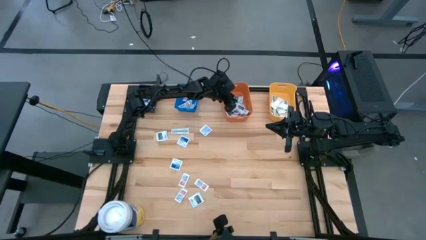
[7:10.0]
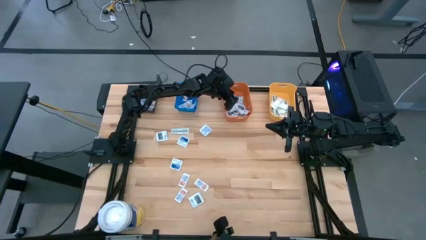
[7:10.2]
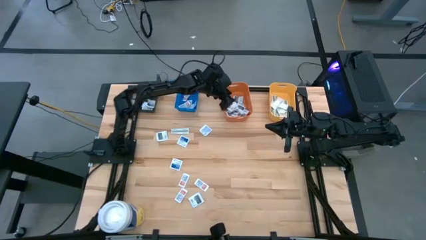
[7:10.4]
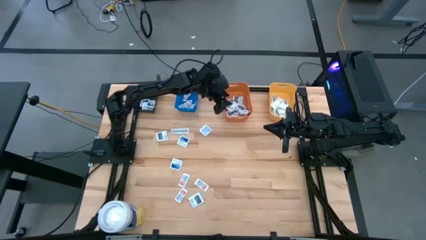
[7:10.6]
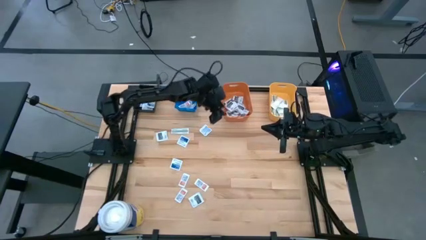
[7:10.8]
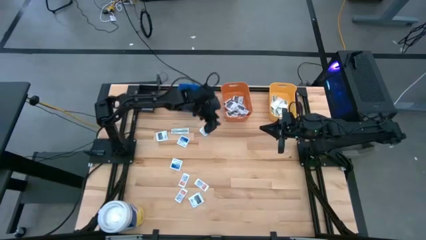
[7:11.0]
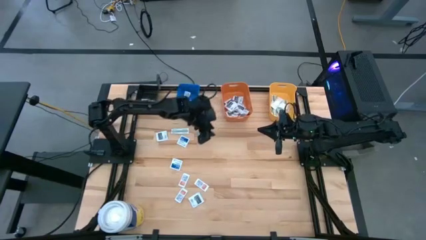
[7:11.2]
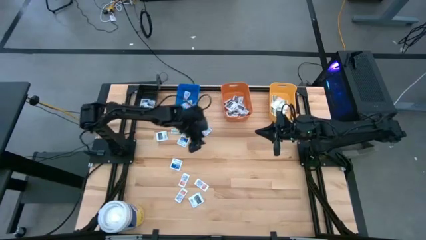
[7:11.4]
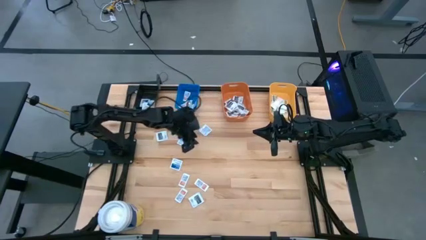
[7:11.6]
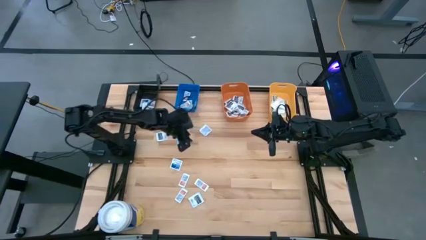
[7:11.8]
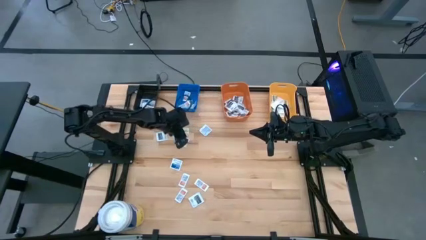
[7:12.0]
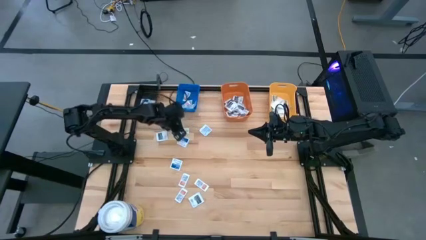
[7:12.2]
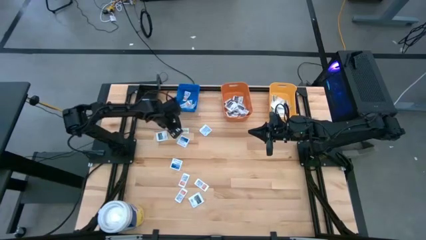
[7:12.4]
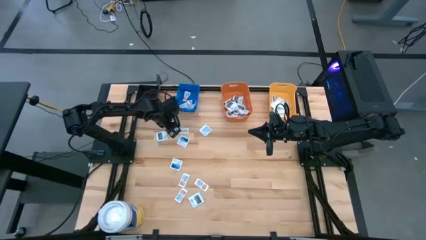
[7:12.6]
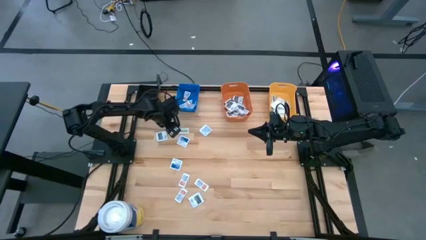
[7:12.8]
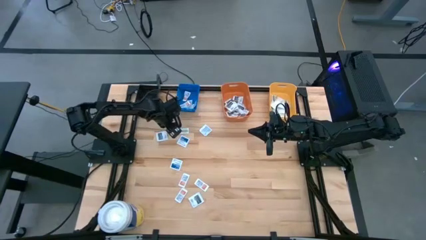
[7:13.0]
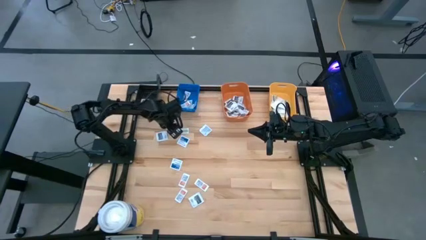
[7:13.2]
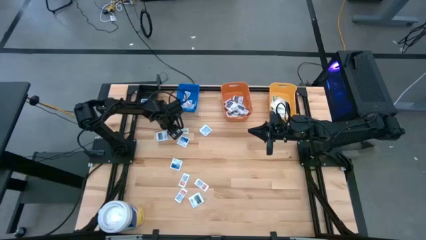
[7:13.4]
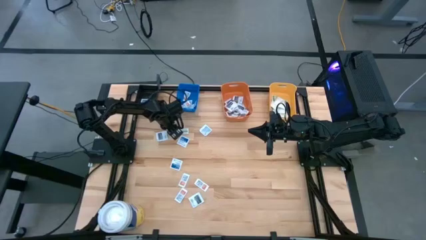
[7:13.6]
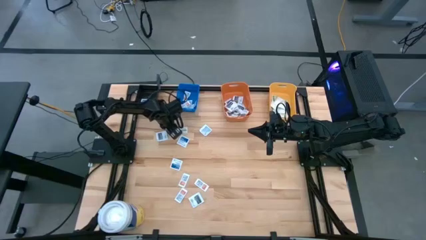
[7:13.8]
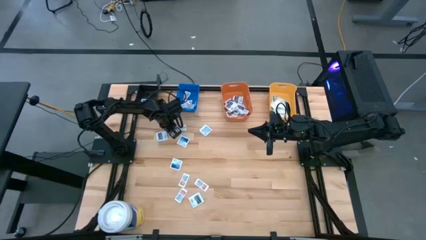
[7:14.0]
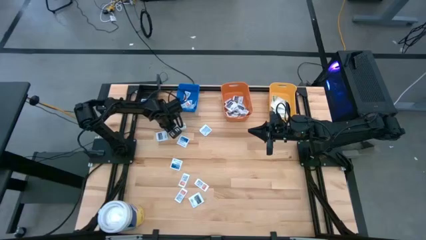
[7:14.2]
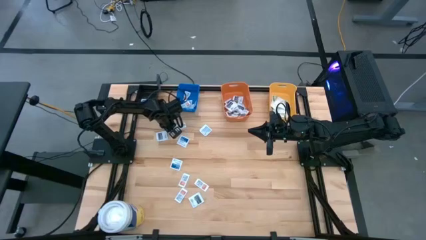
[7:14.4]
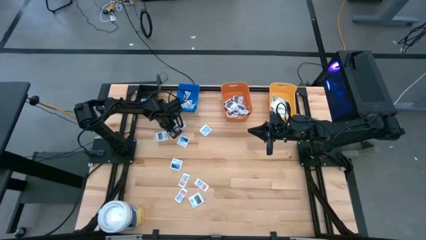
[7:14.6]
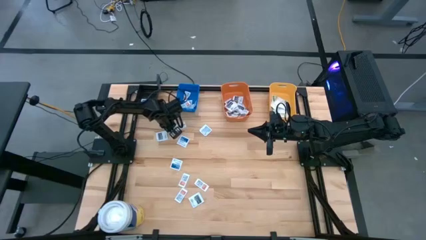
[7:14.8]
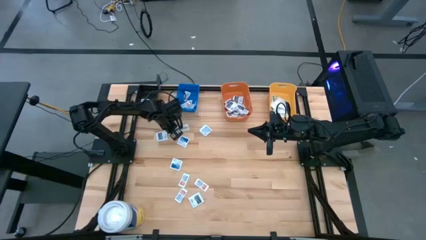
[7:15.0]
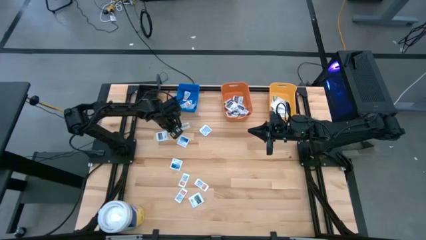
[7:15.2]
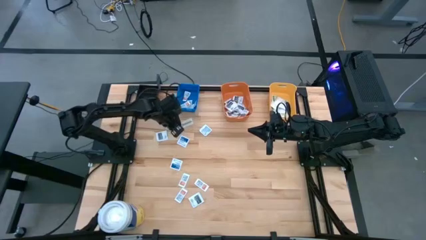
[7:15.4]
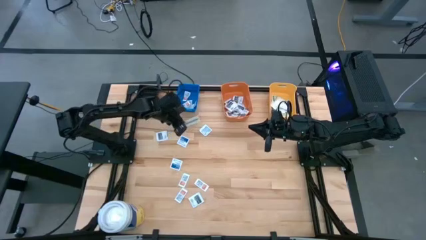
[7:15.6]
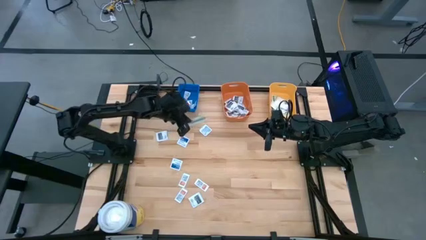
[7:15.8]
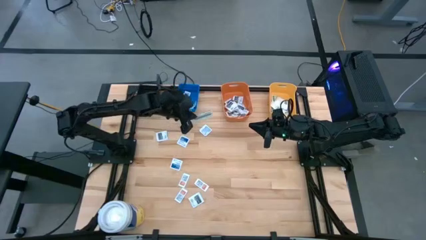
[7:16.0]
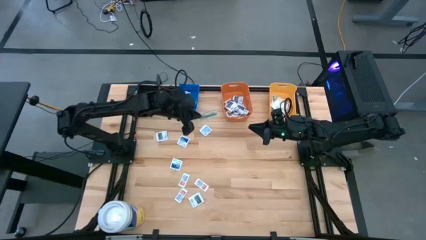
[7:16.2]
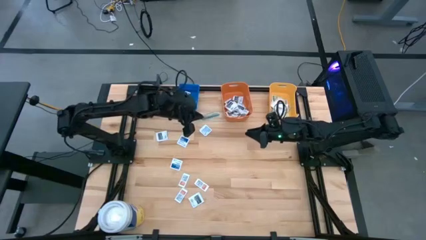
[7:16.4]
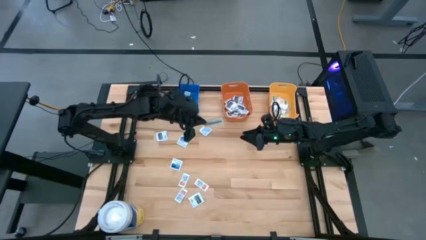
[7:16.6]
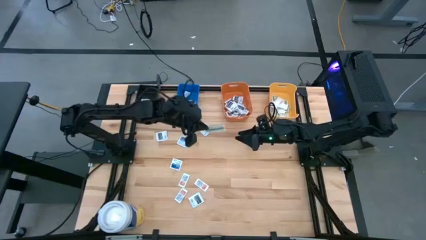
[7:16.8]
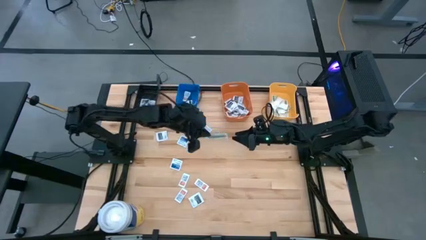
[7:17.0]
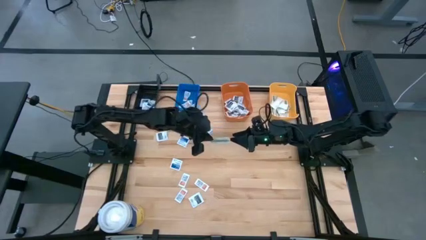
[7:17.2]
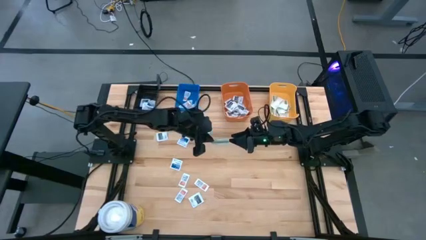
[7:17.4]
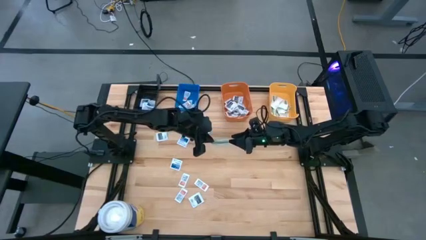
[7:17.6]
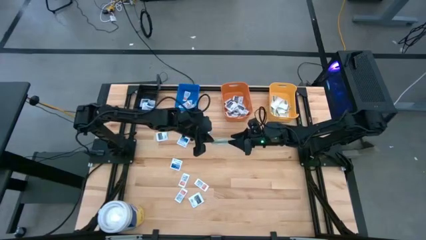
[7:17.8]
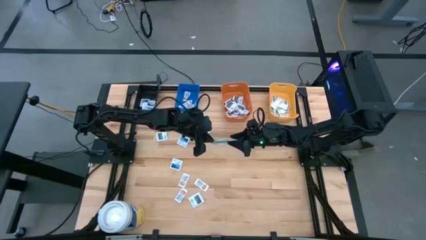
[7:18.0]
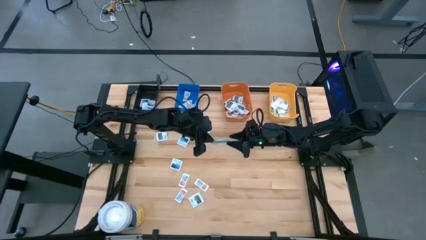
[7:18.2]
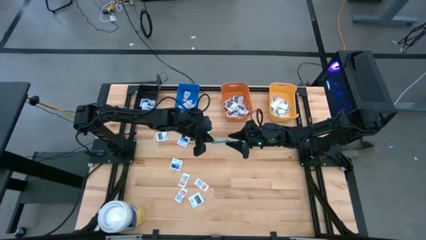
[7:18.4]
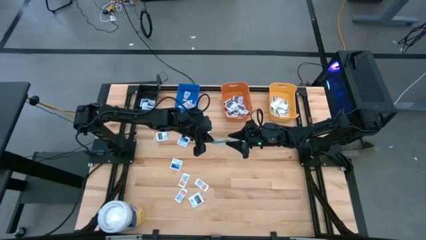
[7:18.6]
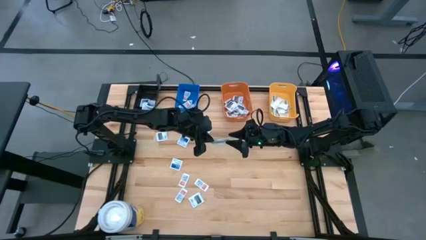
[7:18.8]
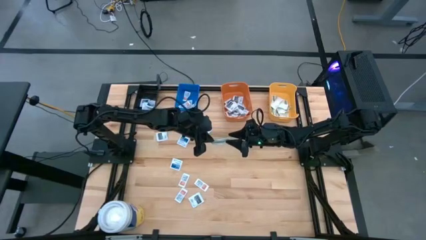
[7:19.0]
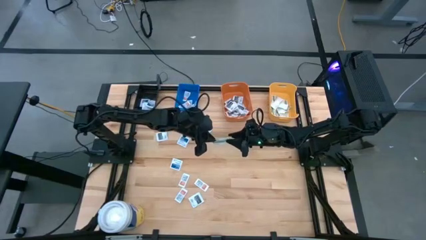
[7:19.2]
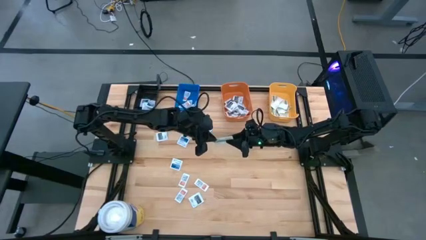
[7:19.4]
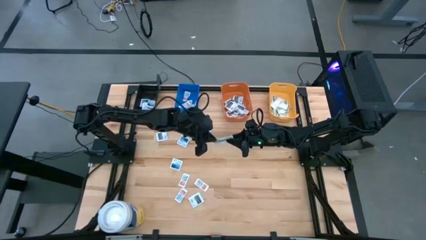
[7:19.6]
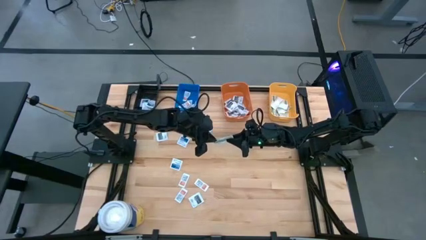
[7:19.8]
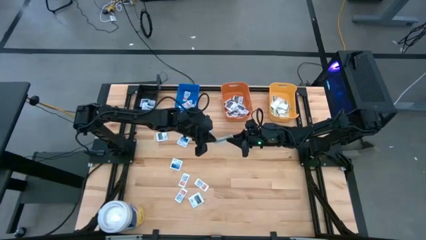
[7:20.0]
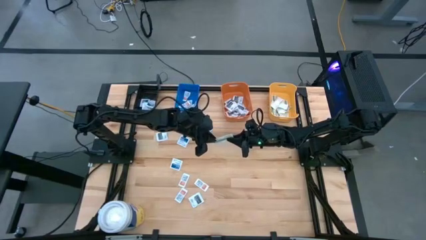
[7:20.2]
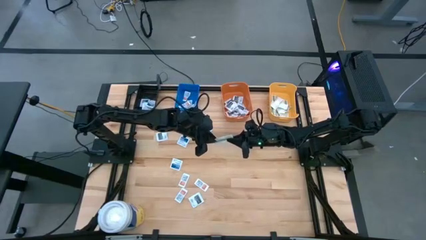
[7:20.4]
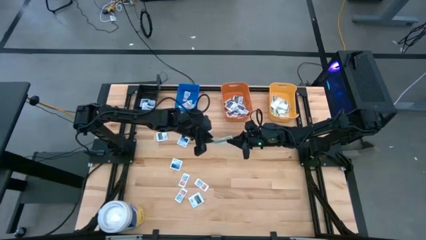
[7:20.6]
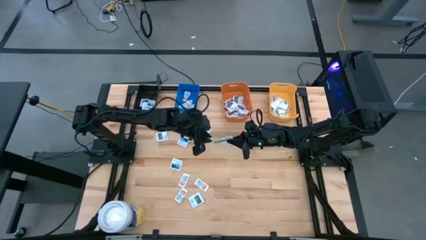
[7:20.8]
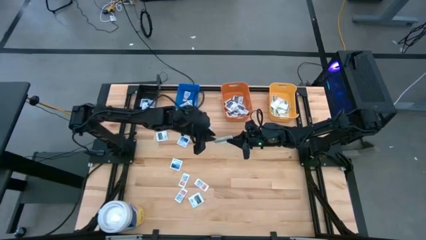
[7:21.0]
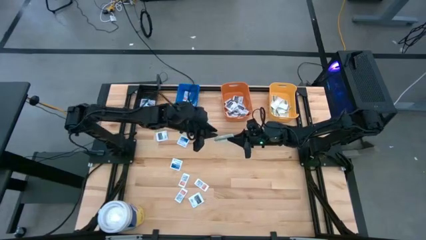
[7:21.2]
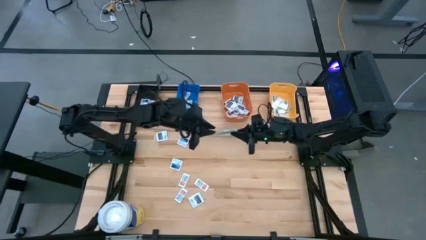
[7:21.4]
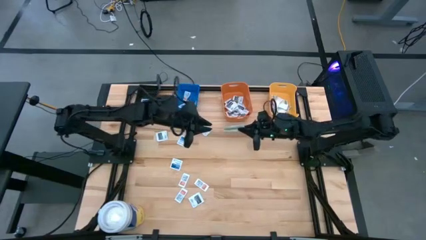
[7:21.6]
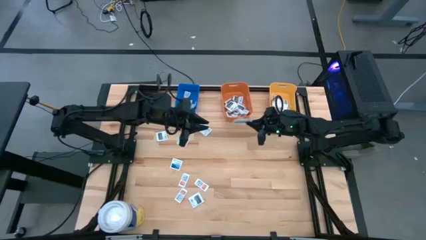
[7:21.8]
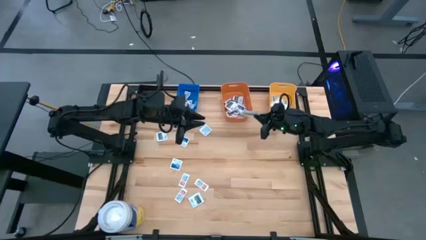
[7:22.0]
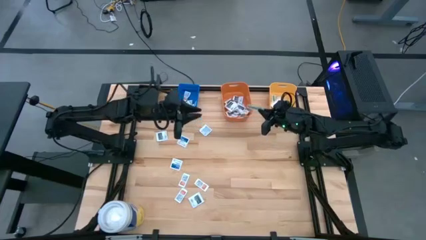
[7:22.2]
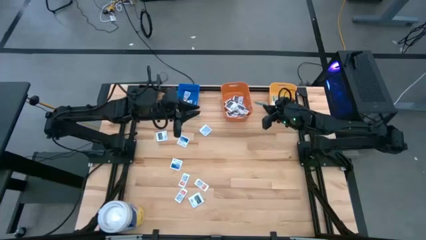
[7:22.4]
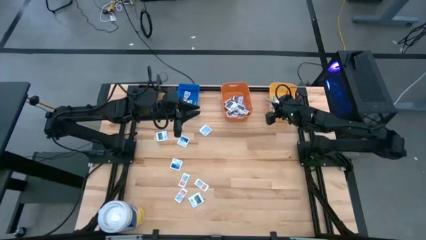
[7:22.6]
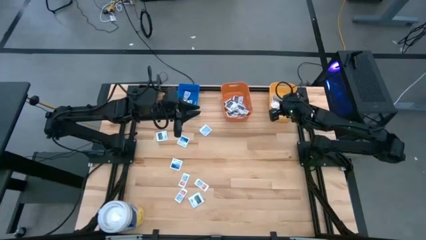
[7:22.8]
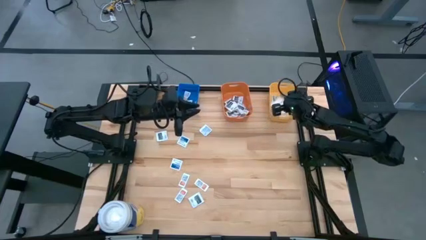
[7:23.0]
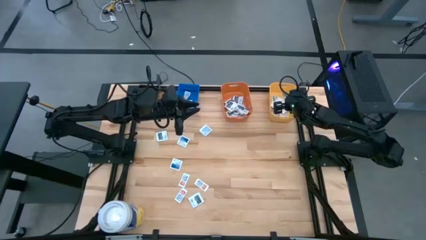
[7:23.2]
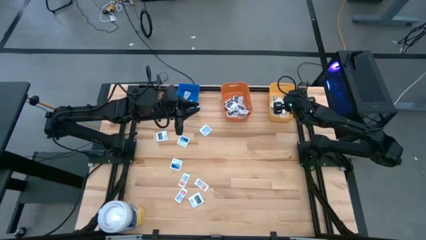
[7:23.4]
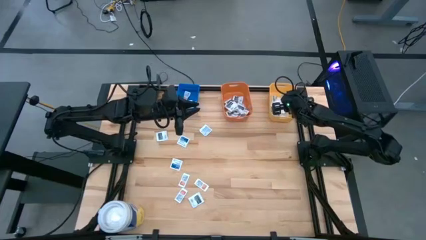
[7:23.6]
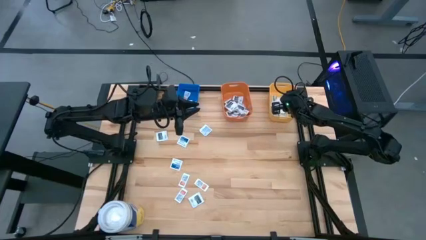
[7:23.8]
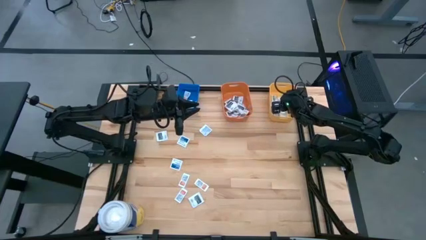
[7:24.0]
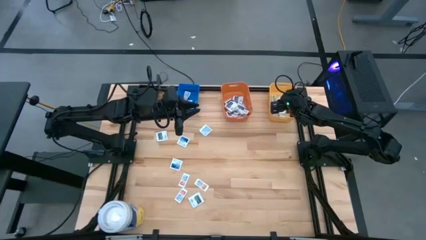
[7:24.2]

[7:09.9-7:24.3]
Task: Pick & Place First Aid Supplies
Put the bandage into the yellow bin

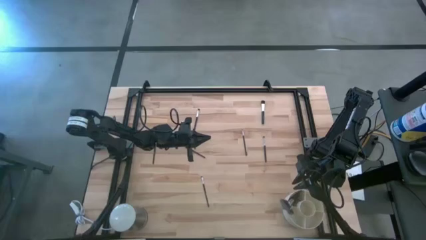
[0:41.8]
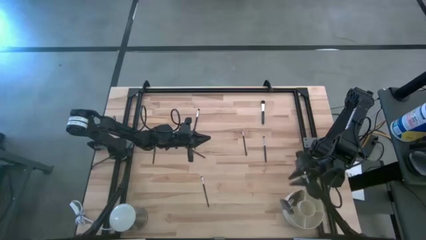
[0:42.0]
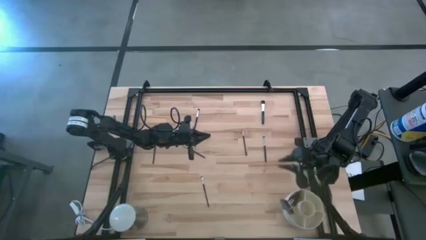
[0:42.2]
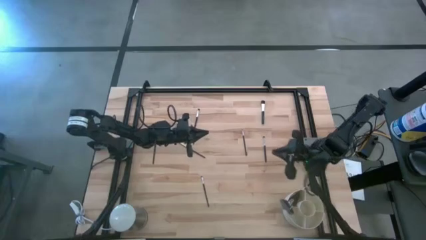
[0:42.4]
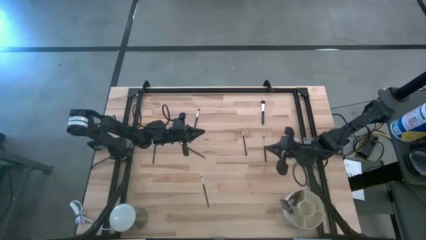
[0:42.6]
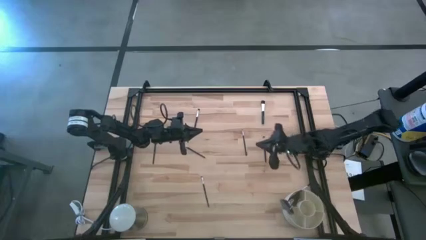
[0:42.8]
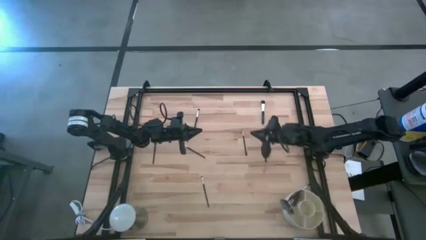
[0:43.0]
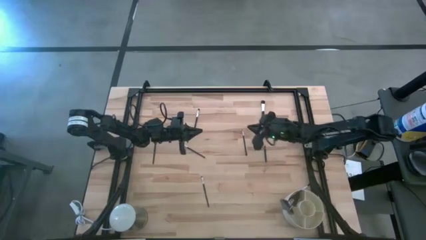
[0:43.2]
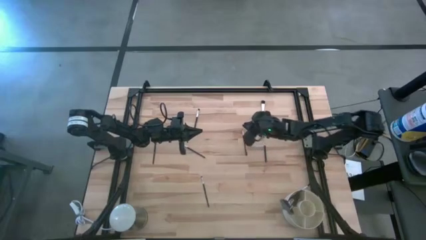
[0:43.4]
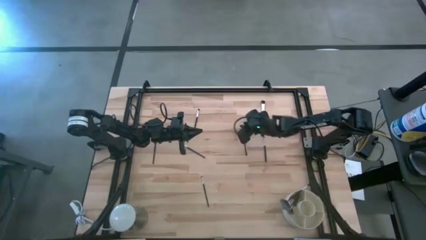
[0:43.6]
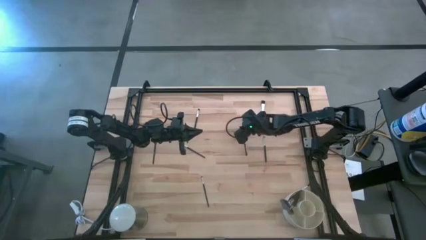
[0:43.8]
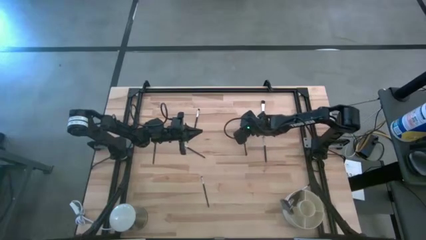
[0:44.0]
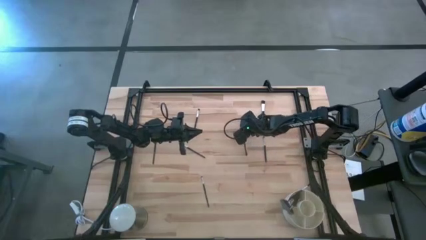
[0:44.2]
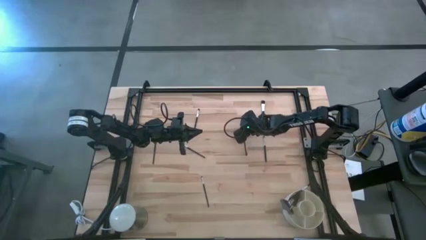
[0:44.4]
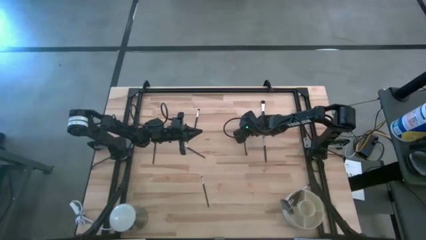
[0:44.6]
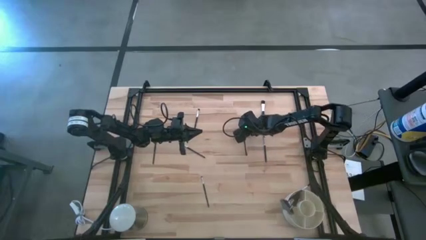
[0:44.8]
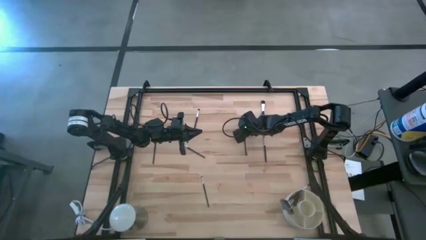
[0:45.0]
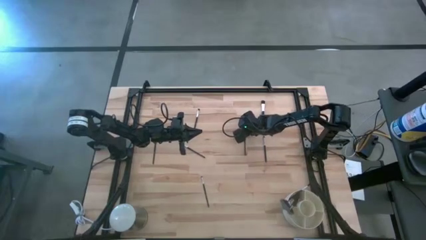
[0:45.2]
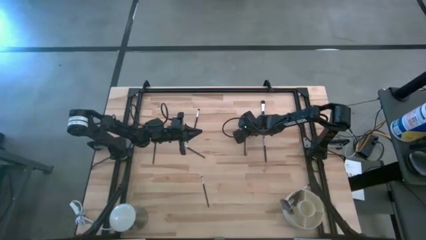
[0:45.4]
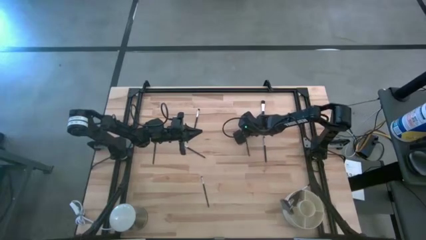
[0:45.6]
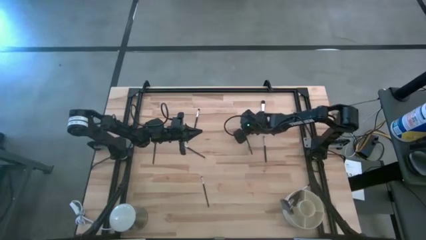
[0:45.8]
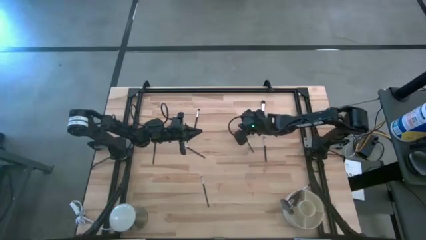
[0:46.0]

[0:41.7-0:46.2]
Task: Put items in baskets/containers
Put the black eyeshadow brush into the white organizer
